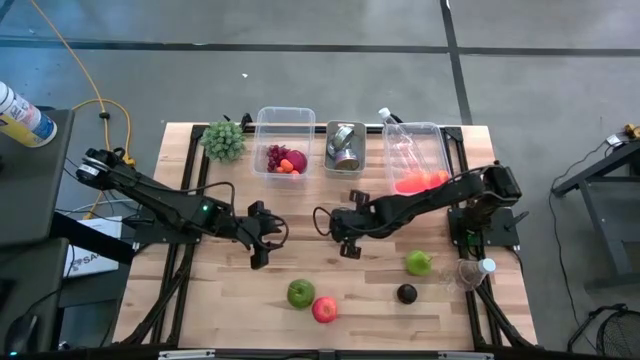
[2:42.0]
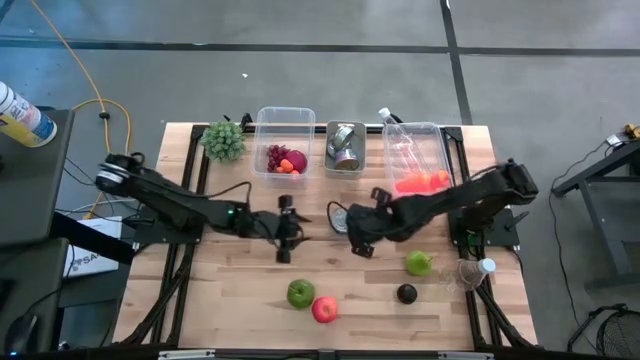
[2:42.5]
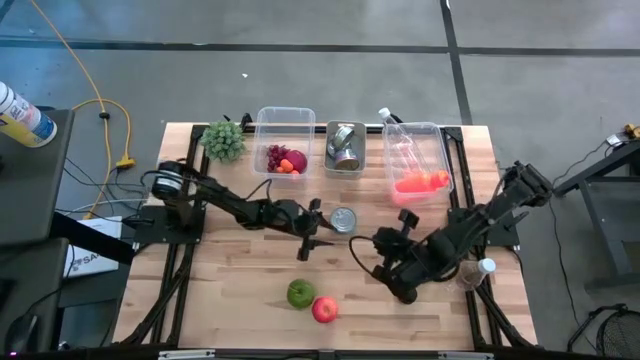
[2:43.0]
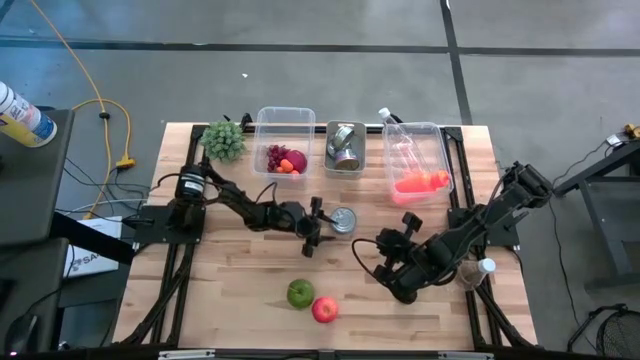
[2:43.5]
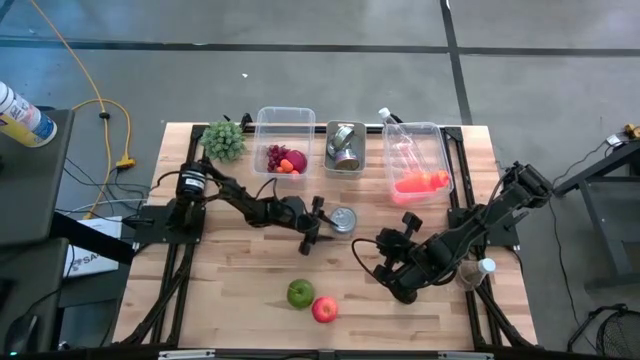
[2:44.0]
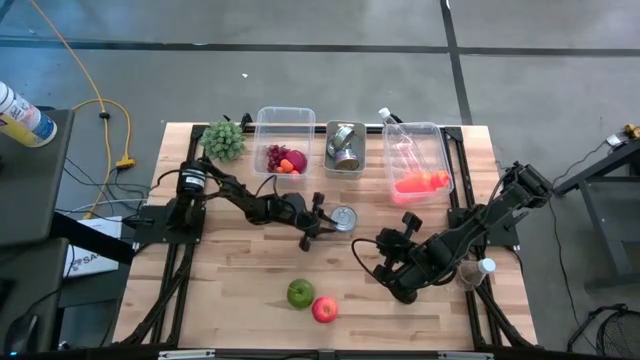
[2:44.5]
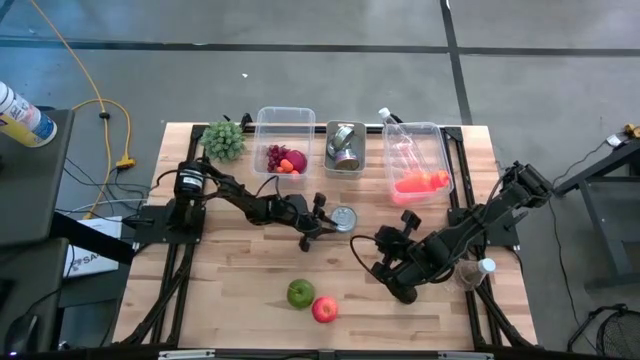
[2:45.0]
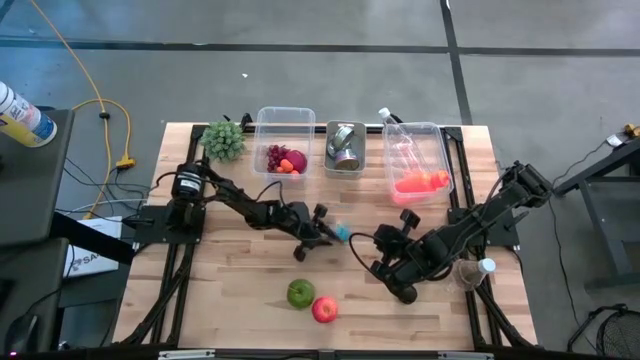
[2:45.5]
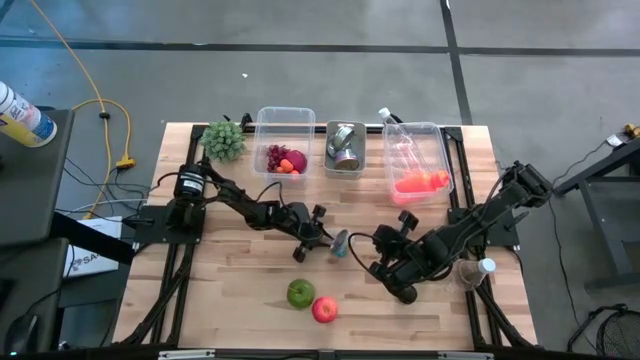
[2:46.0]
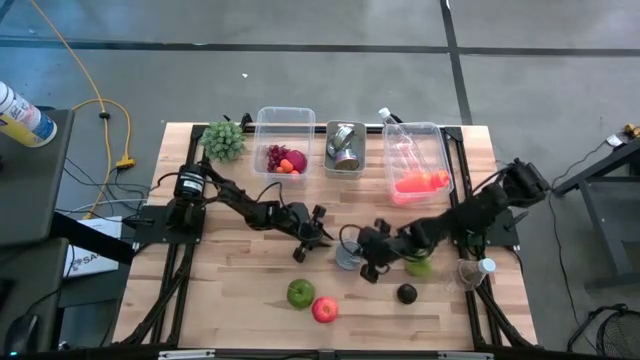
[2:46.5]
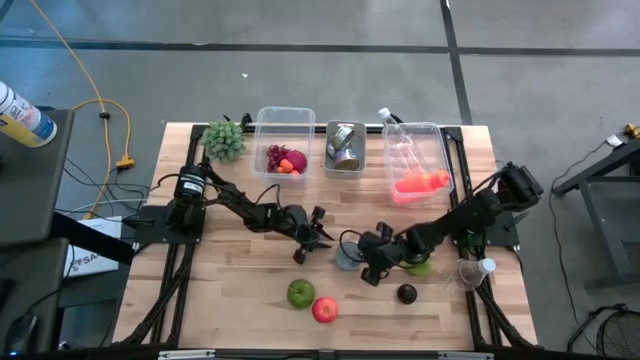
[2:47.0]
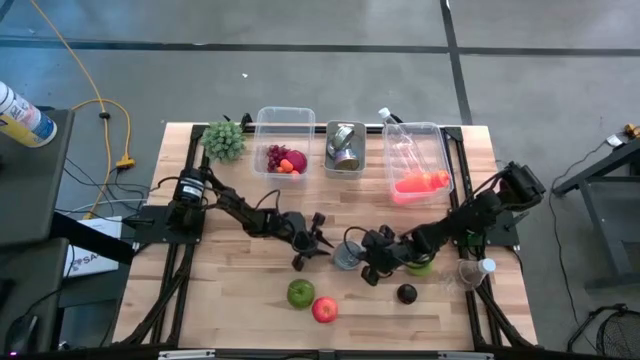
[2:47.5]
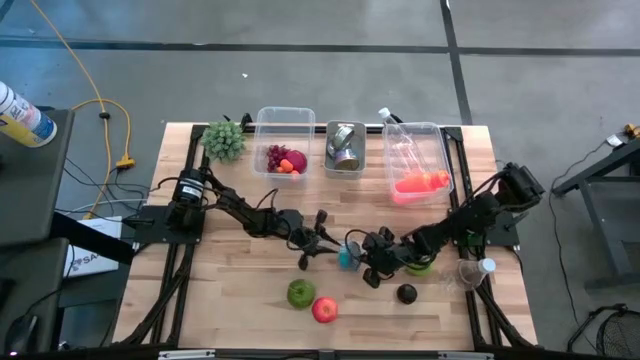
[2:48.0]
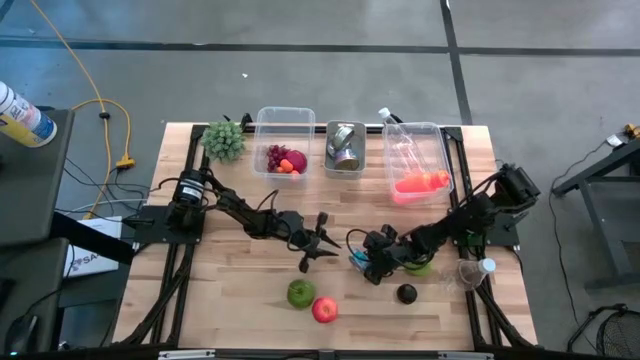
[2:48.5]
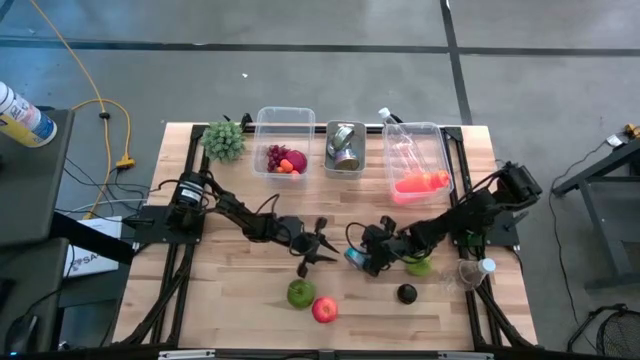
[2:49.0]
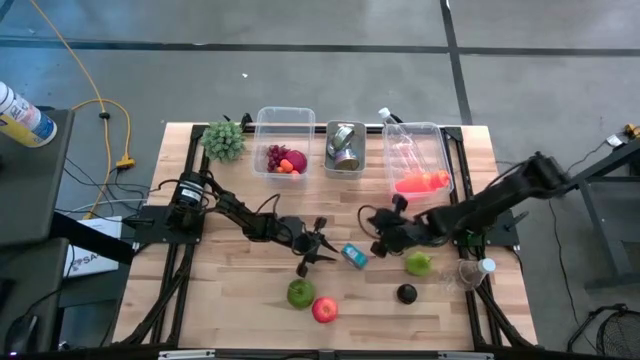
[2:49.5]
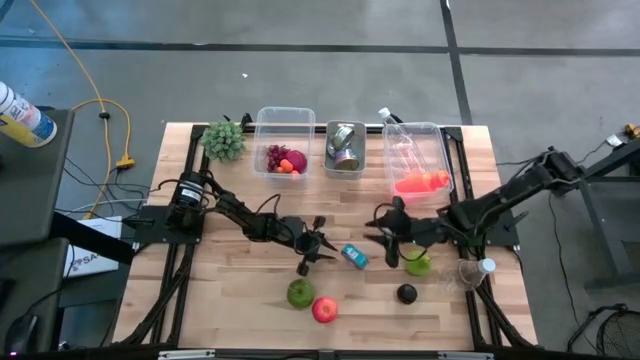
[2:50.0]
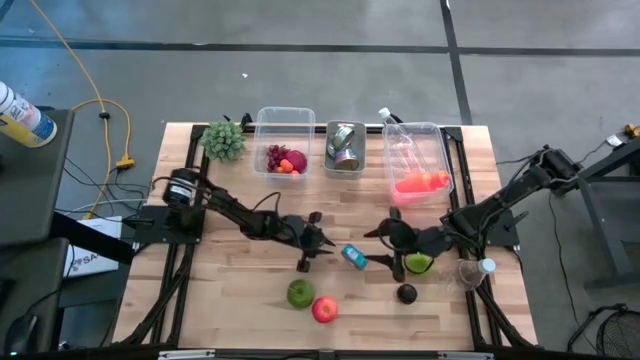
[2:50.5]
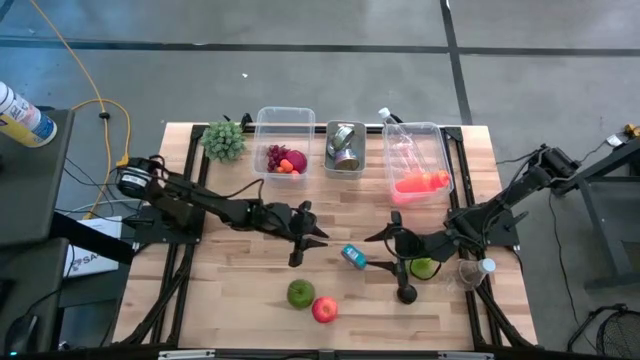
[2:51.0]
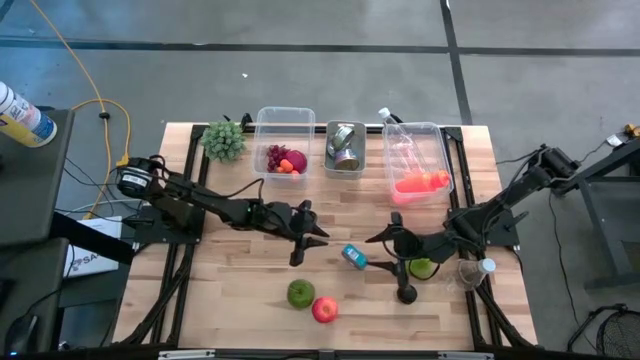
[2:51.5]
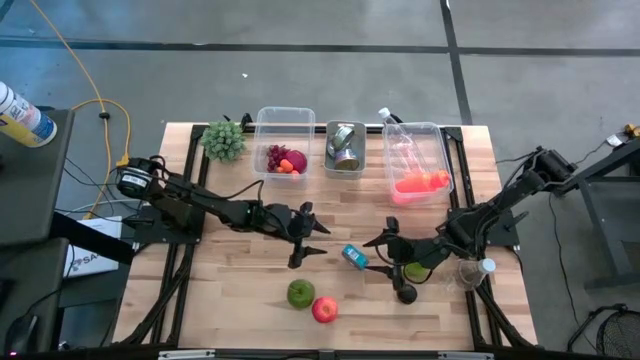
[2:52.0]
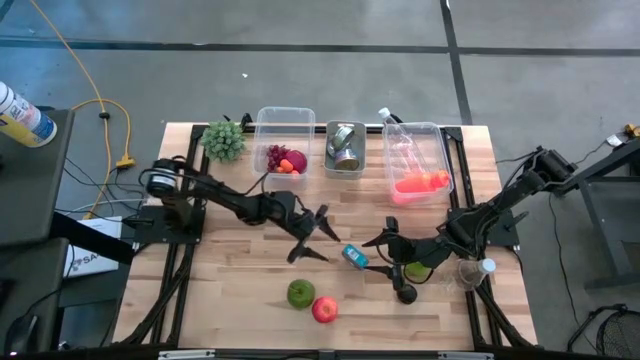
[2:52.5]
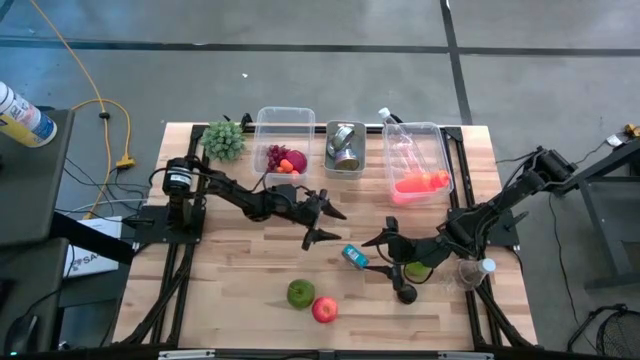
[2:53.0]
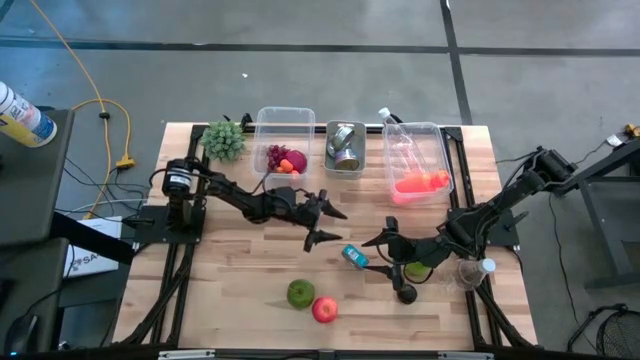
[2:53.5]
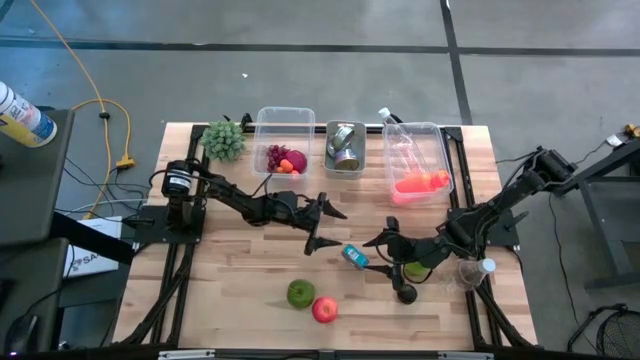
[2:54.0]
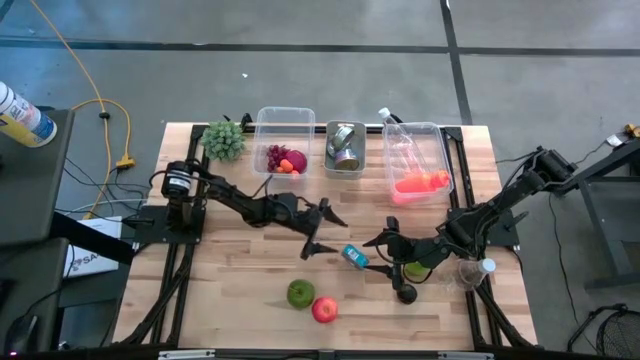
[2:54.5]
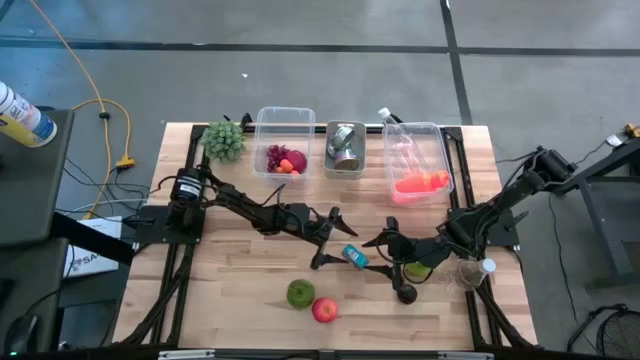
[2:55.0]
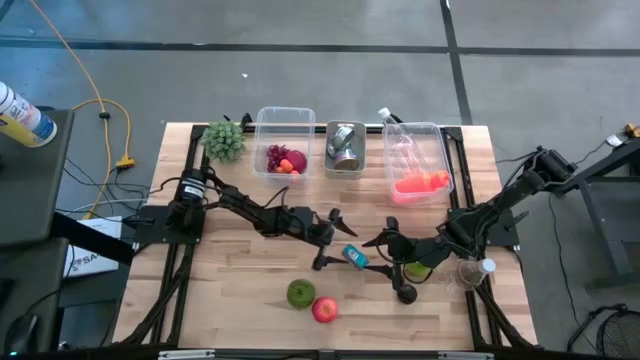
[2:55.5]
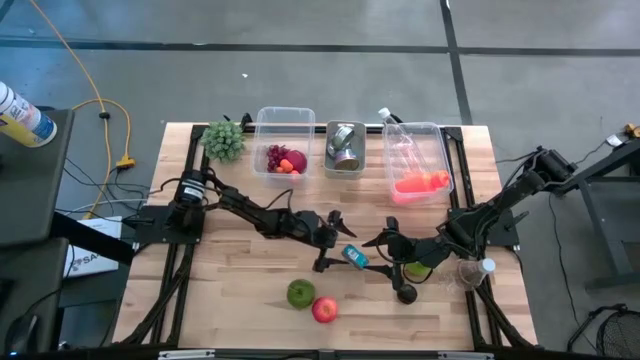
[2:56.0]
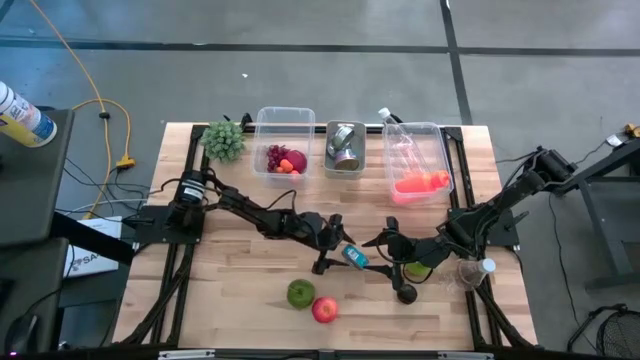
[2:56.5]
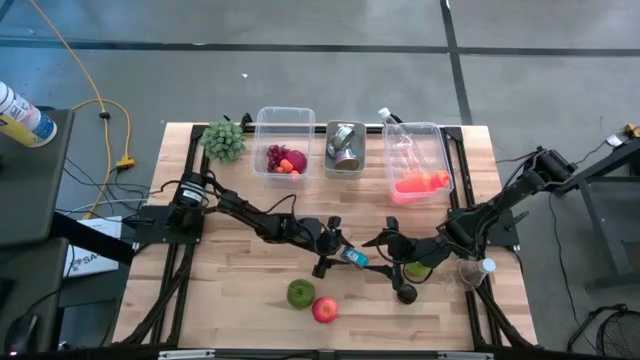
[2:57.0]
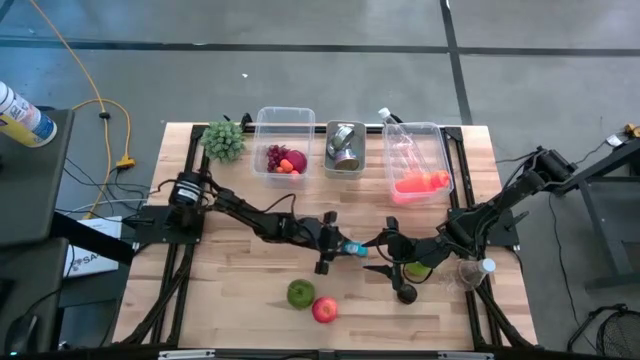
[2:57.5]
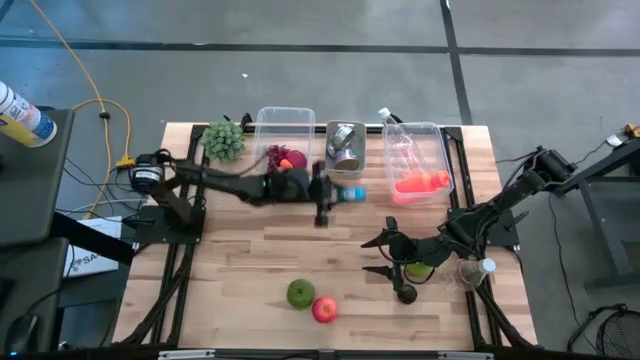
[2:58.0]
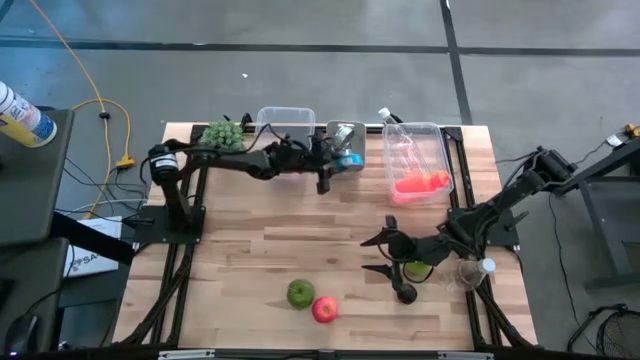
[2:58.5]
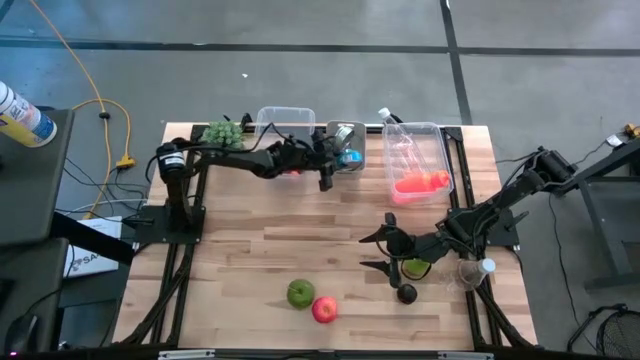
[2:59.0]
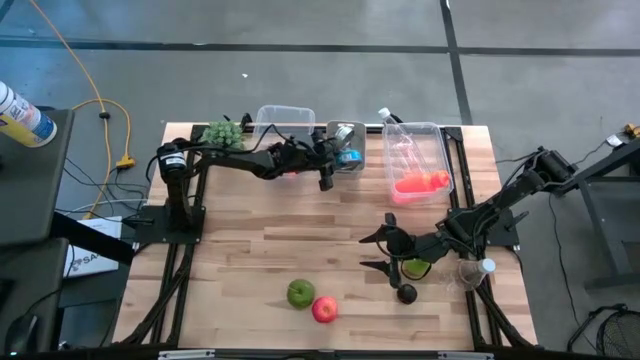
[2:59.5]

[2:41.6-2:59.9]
Task: Pick & Place Food Item
Put the light blue tuna can into the white bin
